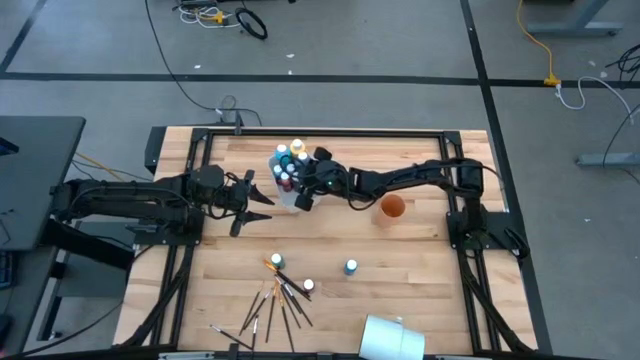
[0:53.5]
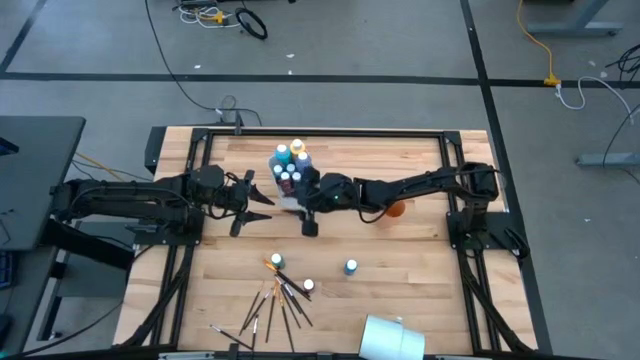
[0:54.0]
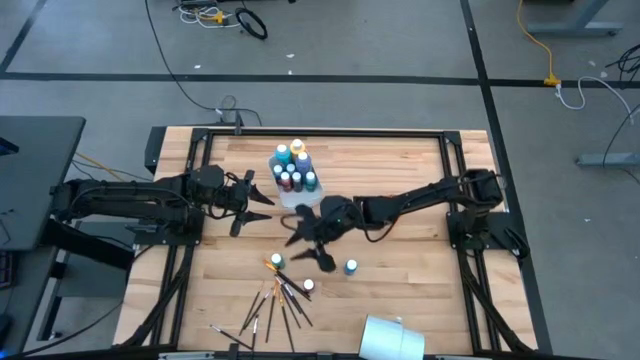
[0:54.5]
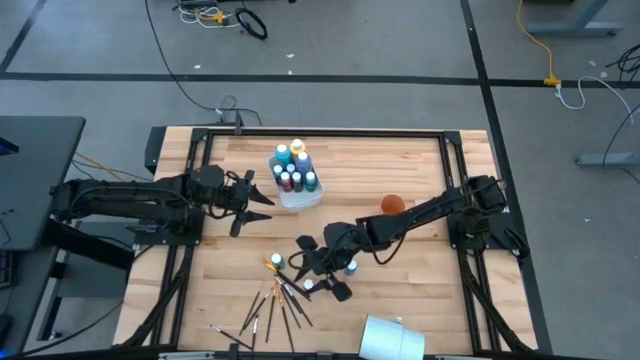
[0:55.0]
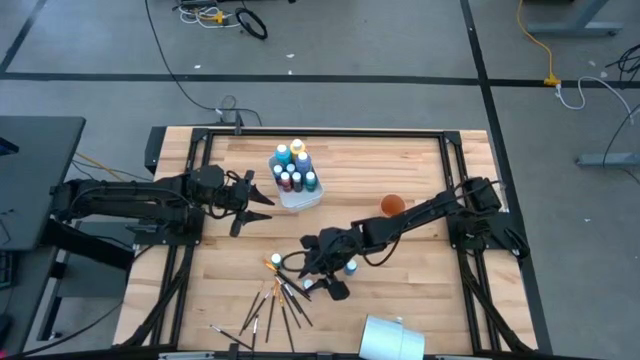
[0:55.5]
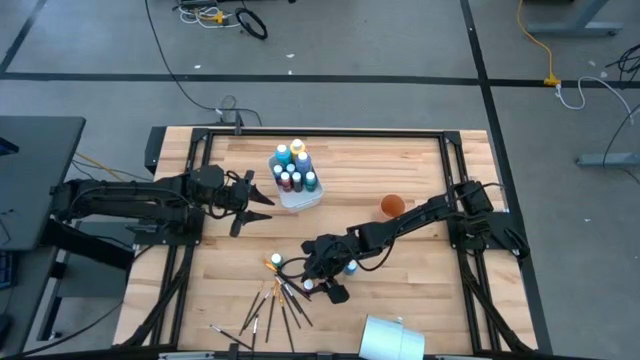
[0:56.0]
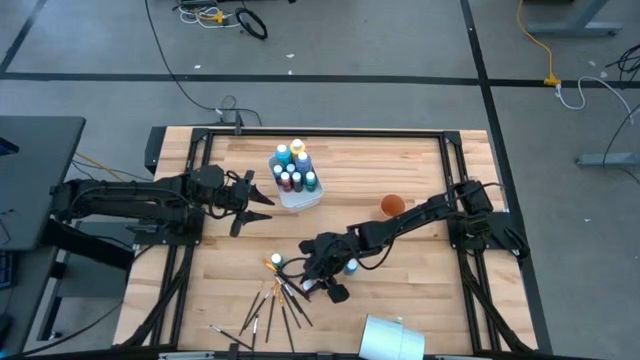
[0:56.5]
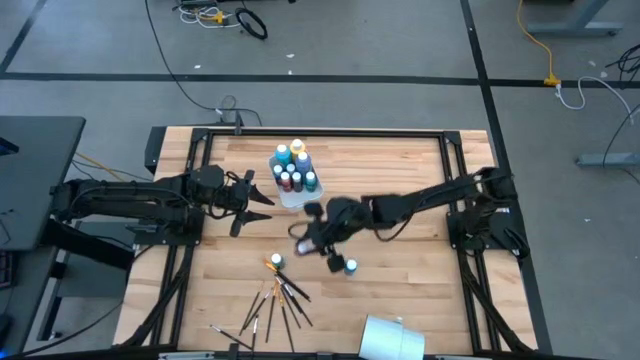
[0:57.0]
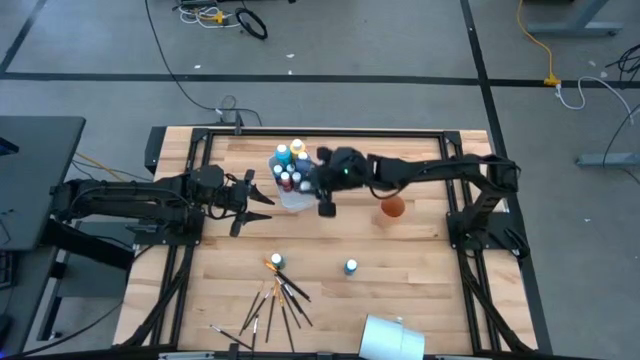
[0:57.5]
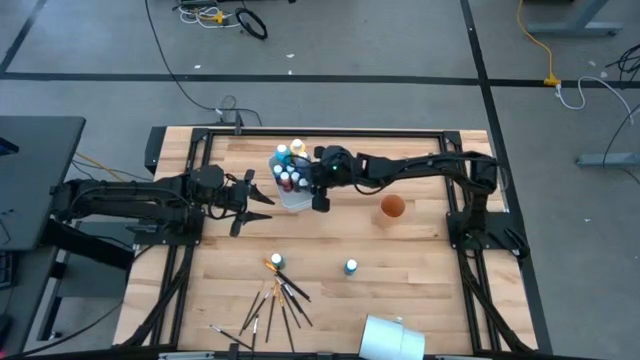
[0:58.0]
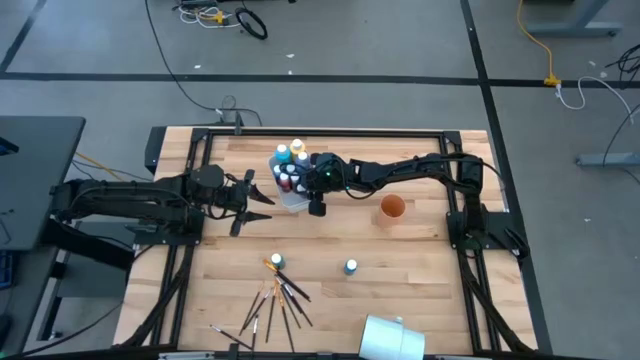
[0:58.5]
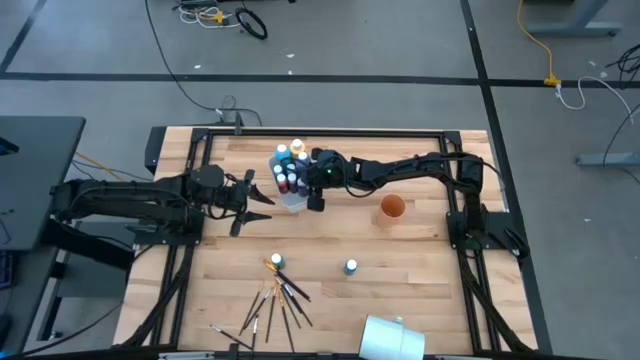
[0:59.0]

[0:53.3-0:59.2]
Task: Pick & Place Paint Supplies
Put the red paint bottle into the white bin

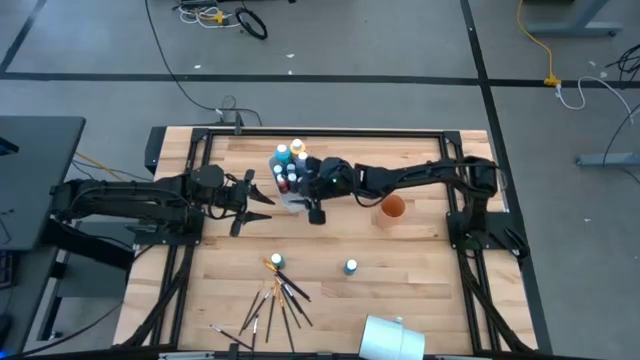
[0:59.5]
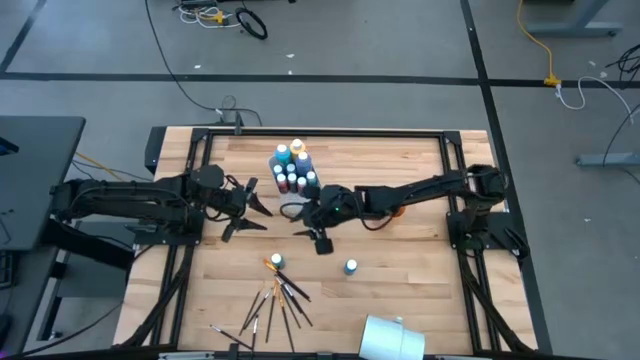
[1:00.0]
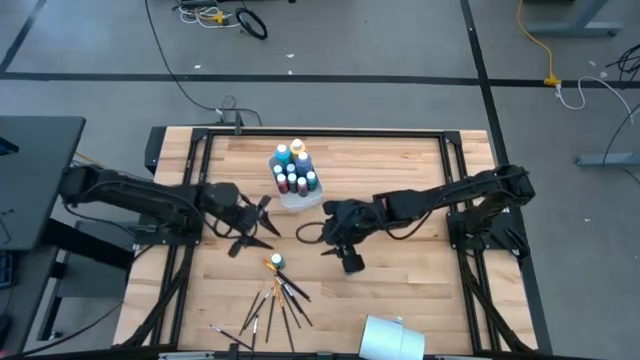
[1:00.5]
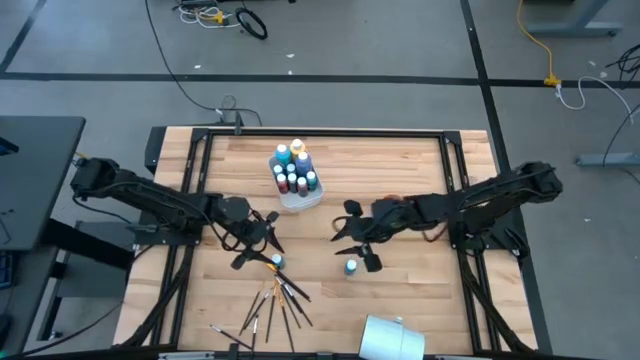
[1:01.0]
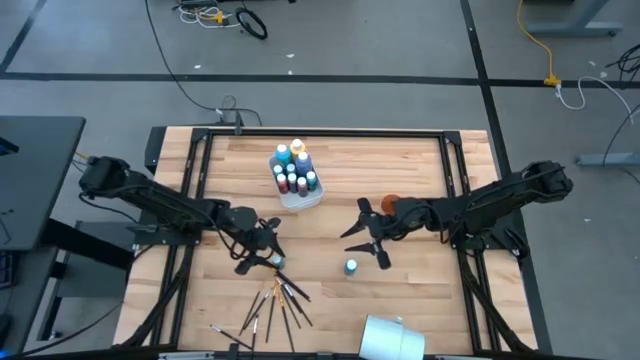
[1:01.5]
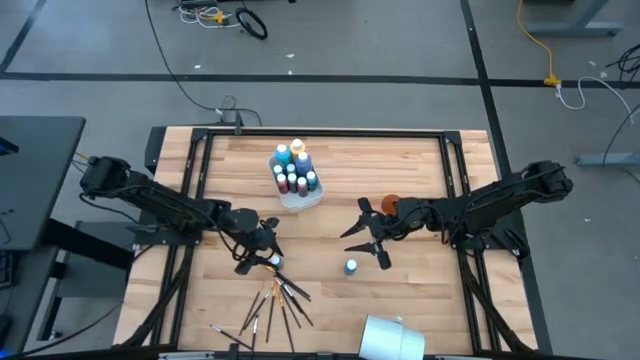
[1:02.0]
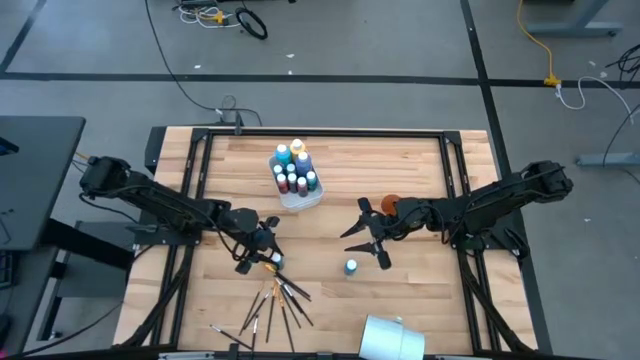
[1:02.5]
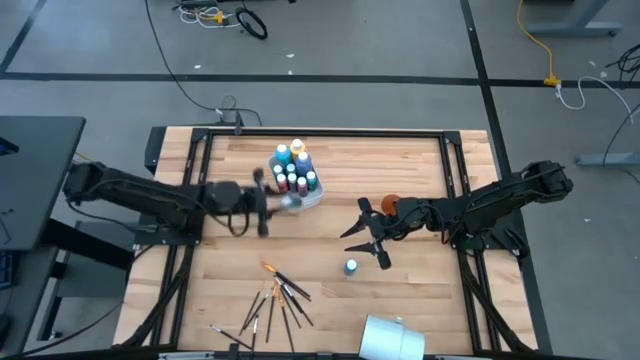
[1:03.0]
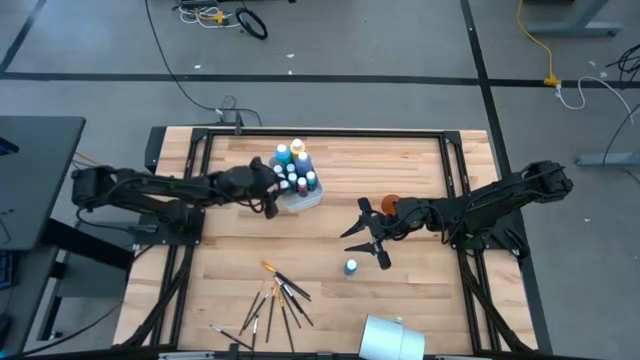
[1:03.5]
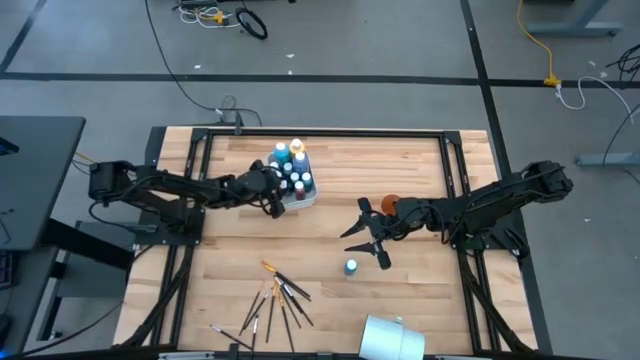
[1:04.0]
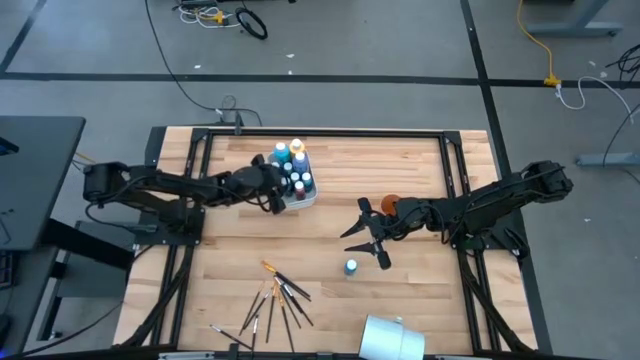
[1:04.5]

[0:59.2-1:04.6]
Put the small light blue paint bottle into the white bin

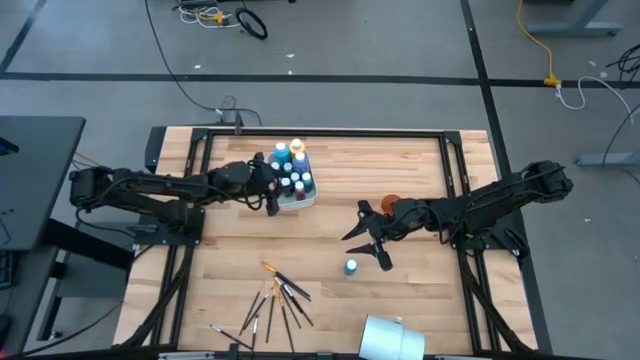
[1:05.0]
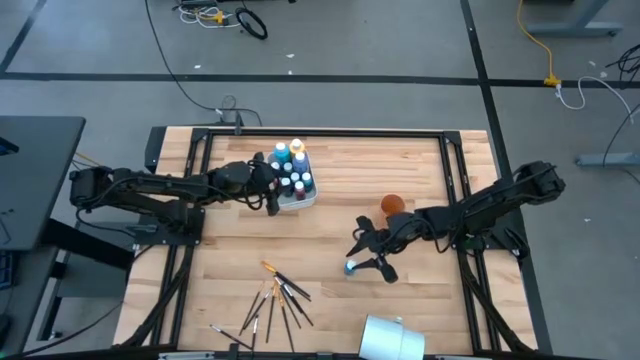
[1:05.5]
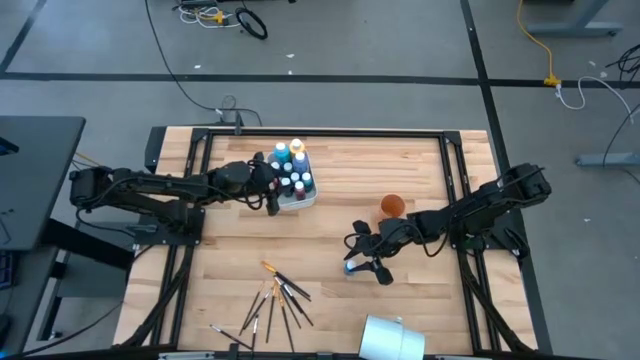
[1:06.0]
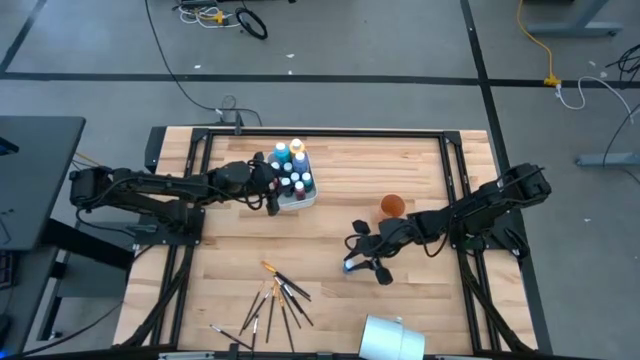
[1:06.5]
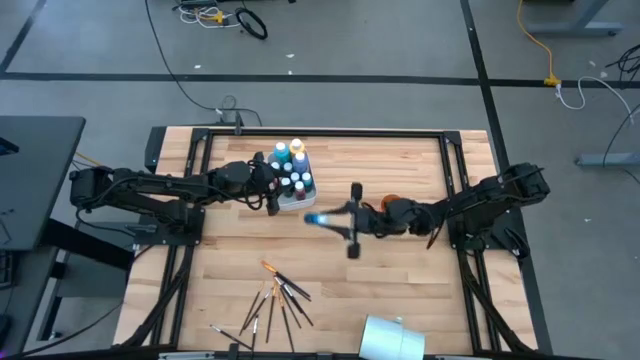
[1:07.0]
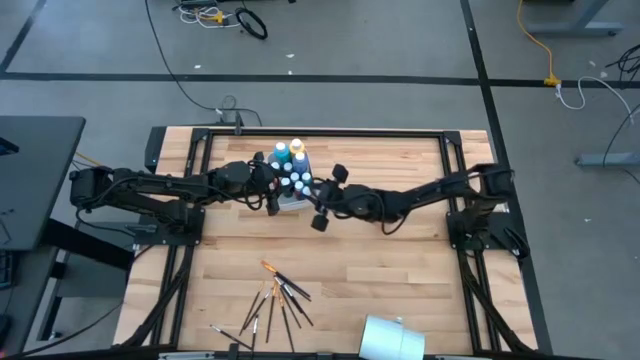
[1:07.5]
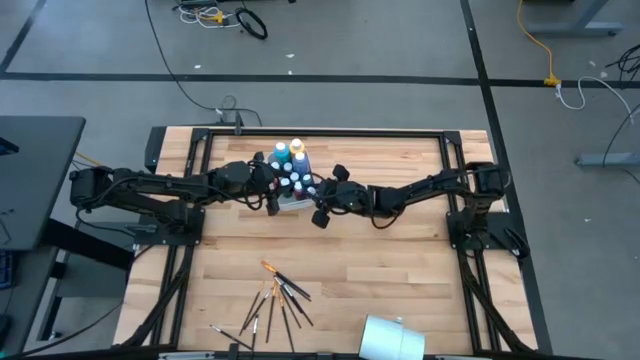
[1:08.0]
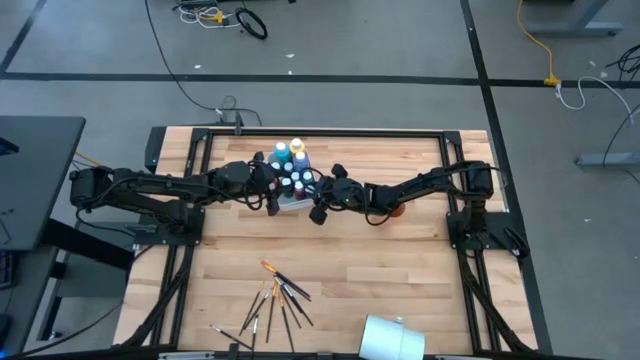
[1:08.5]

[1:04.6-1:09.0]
Put the small blue paint bottle into the white bin

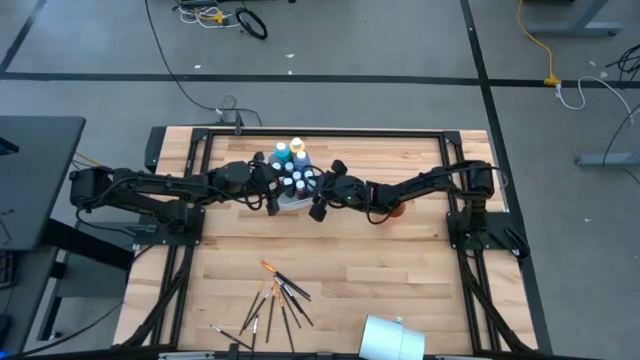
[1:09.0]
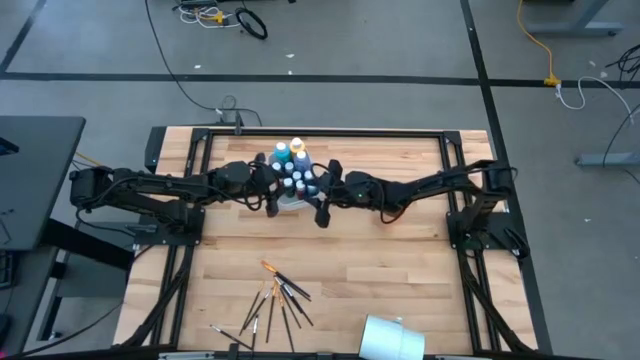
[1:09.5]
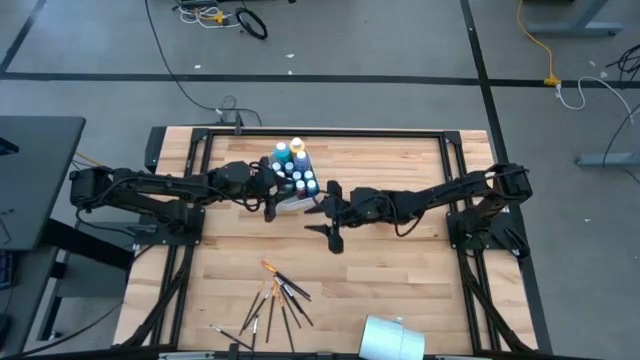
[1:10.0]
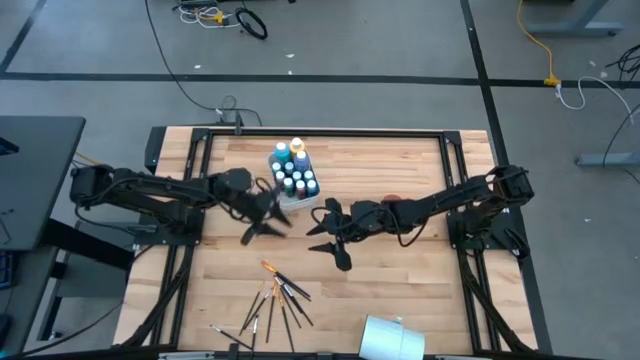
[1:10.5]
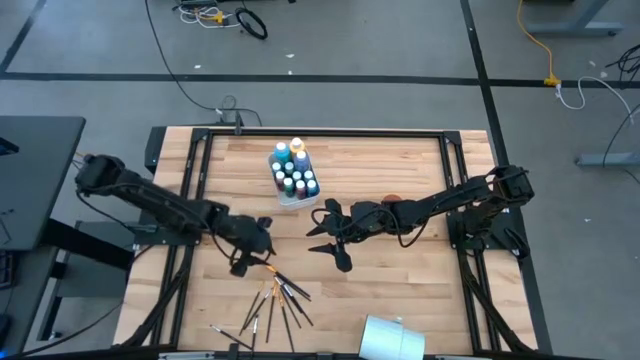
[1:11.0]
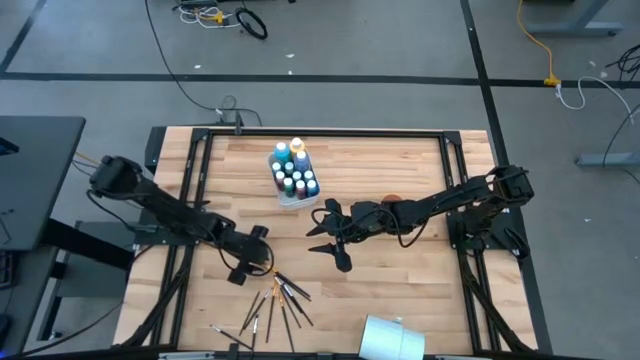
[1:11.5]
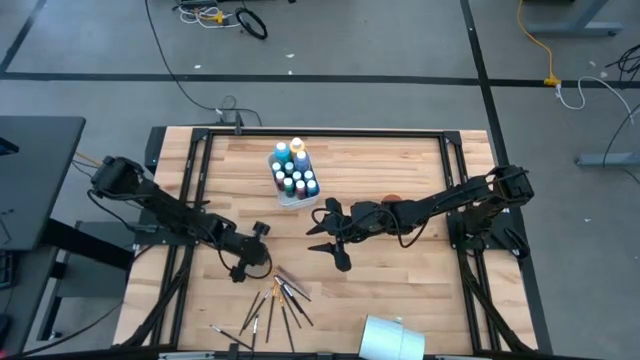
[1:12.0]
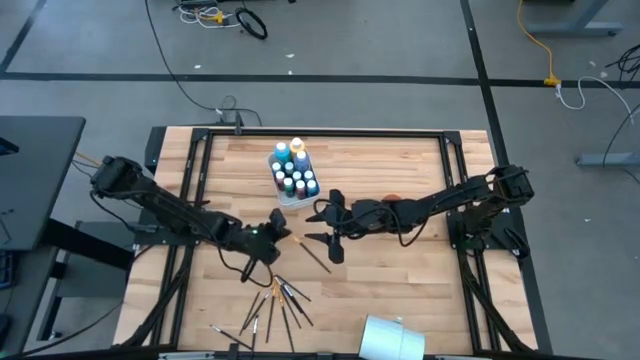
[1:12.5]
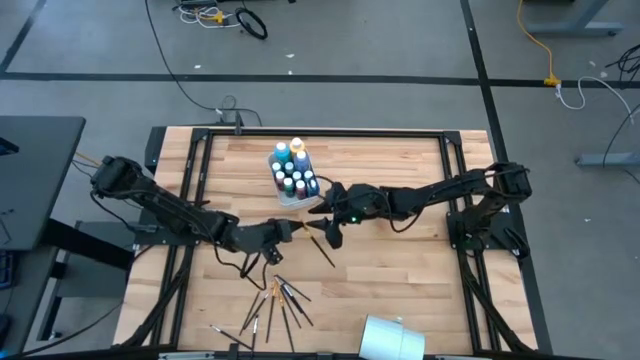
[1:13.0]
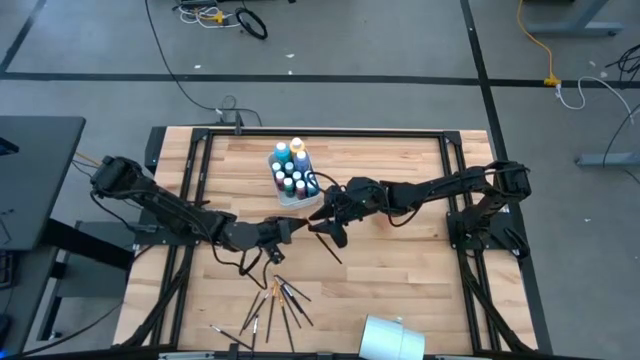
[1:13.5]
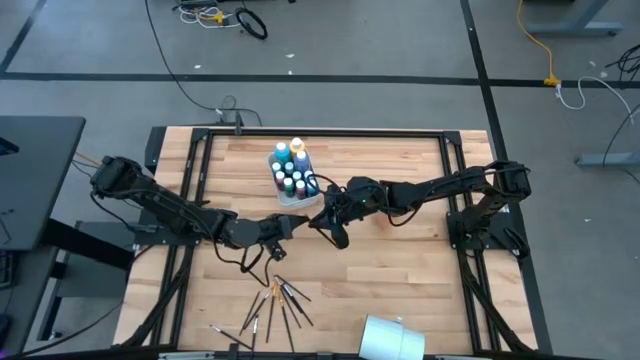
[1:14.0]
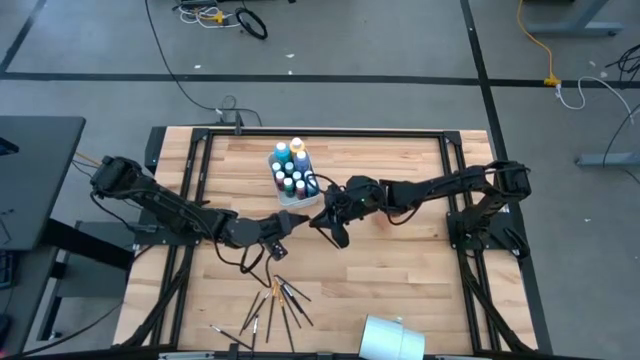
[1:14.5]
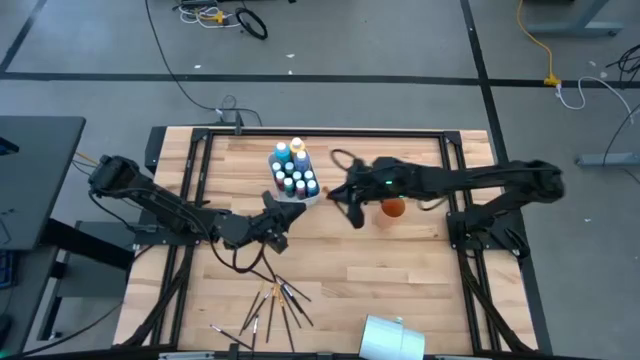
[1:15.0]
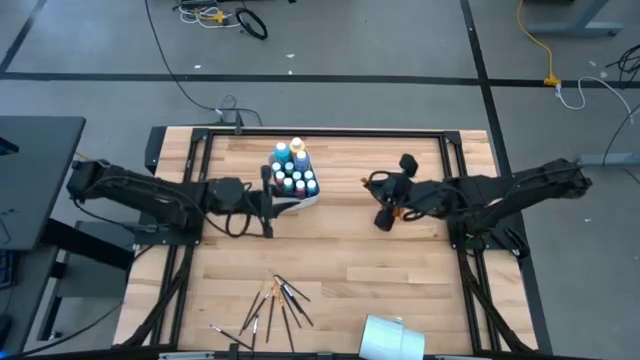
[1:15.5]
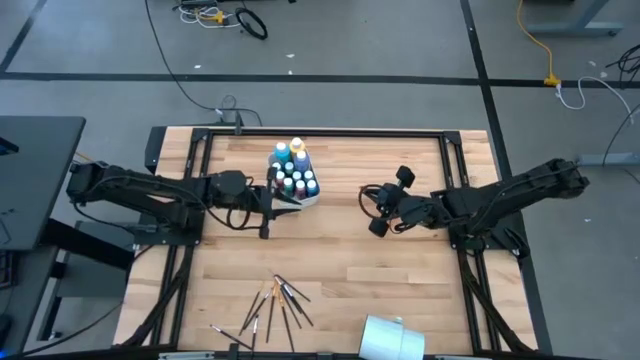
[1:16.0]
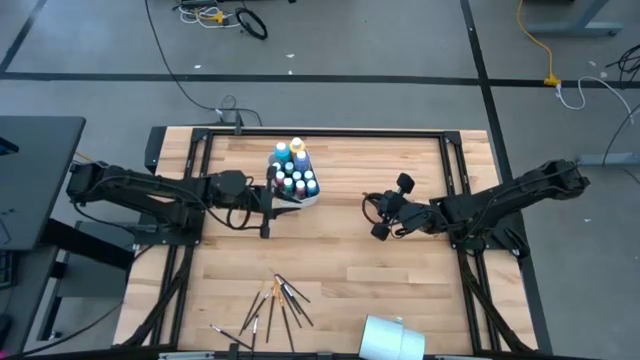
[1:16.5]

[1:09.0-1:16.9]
Put the gold paint brush into the orange cup
